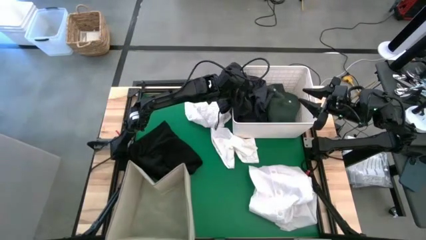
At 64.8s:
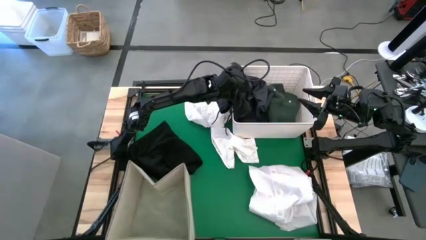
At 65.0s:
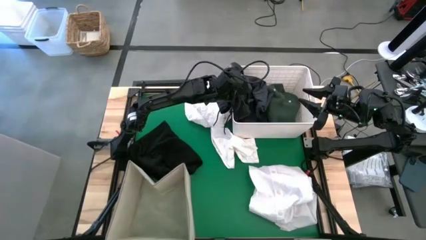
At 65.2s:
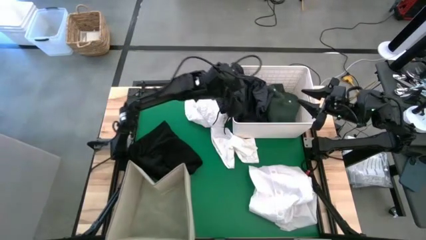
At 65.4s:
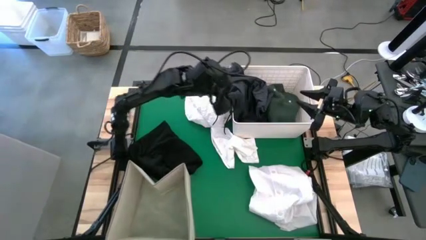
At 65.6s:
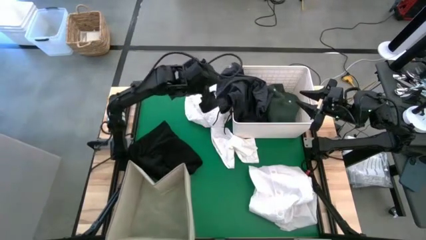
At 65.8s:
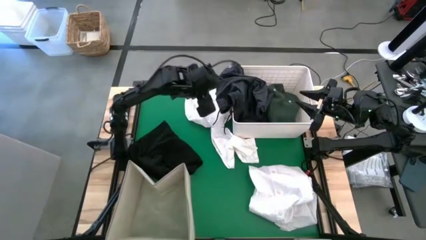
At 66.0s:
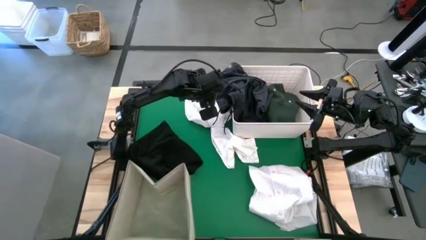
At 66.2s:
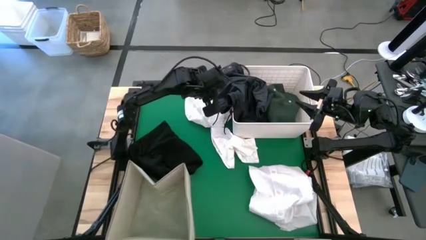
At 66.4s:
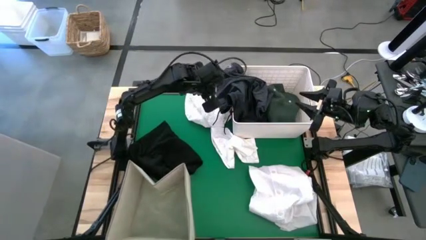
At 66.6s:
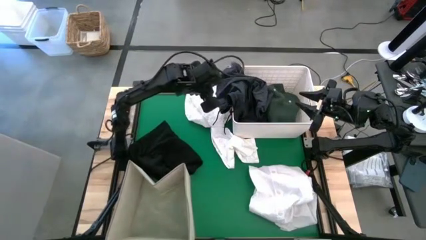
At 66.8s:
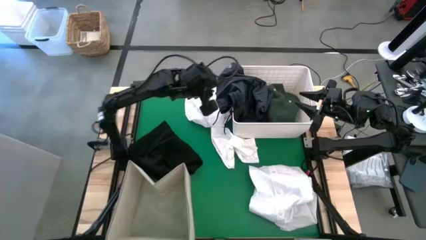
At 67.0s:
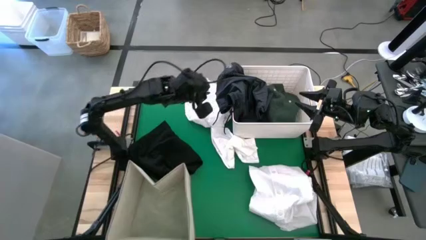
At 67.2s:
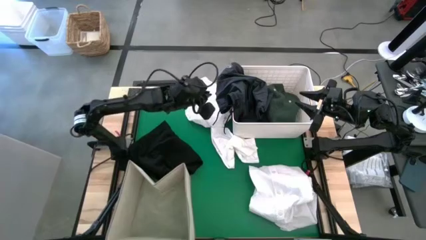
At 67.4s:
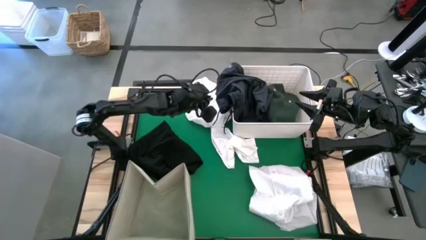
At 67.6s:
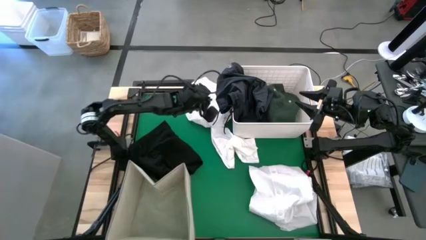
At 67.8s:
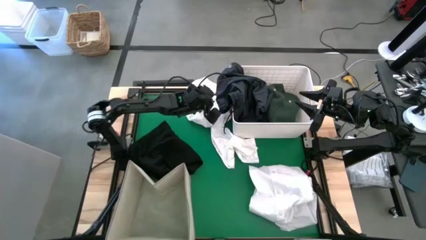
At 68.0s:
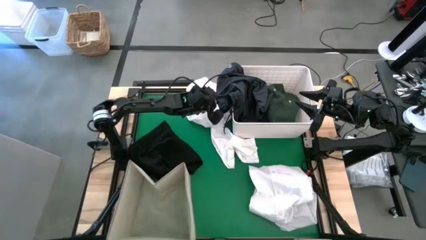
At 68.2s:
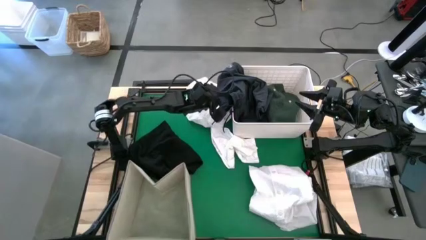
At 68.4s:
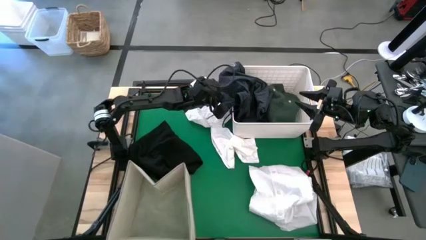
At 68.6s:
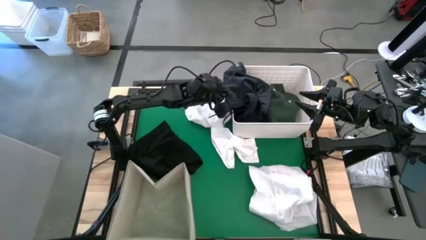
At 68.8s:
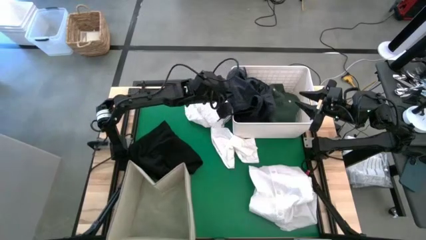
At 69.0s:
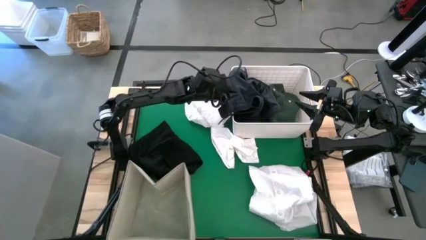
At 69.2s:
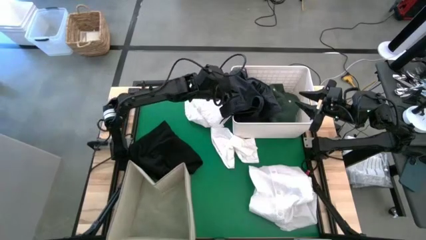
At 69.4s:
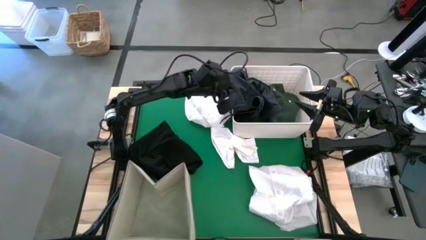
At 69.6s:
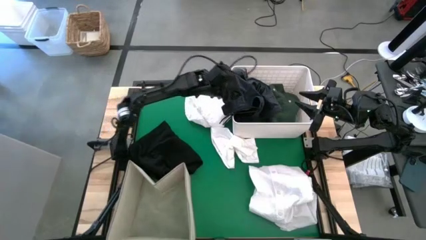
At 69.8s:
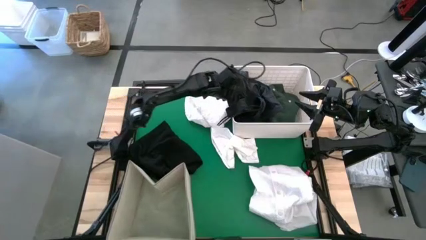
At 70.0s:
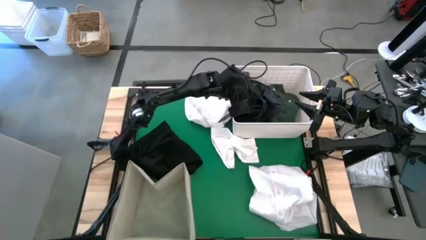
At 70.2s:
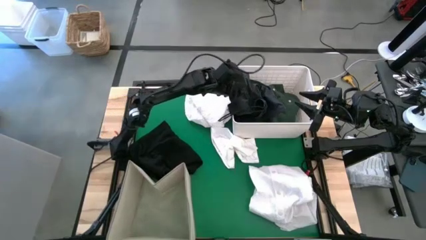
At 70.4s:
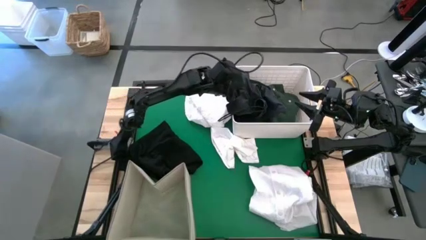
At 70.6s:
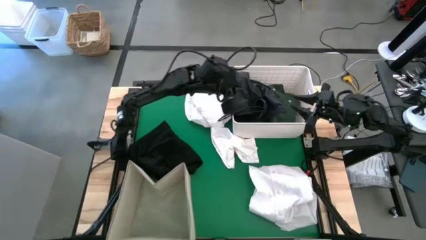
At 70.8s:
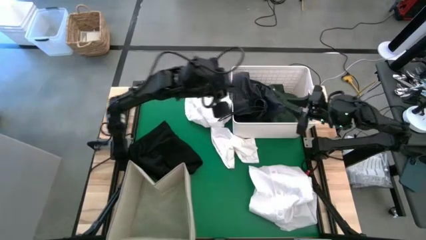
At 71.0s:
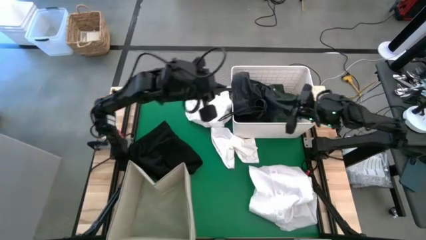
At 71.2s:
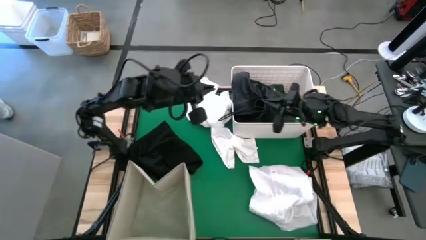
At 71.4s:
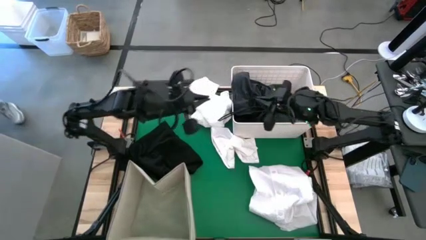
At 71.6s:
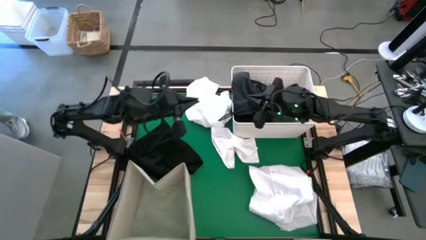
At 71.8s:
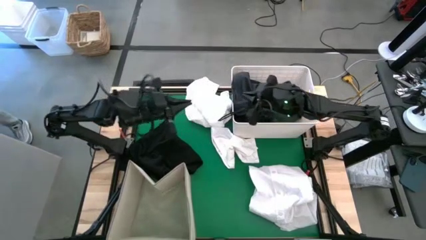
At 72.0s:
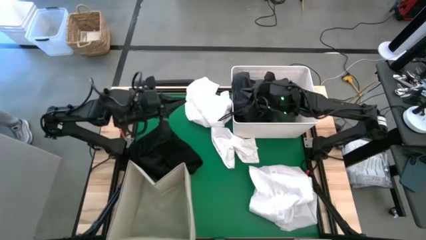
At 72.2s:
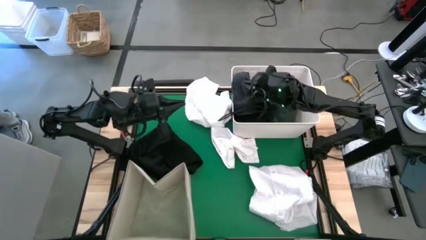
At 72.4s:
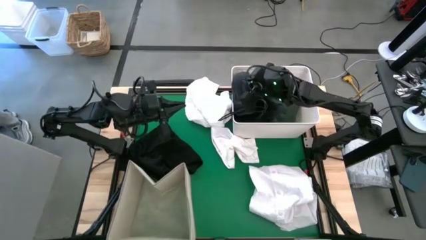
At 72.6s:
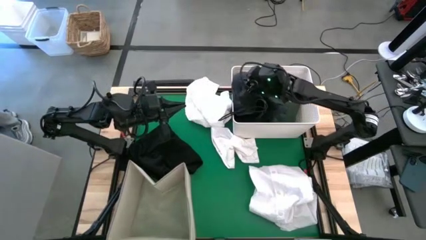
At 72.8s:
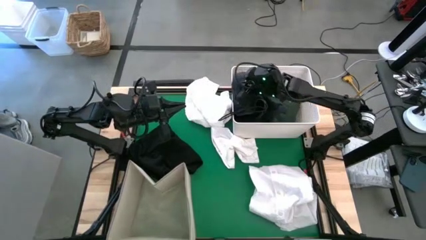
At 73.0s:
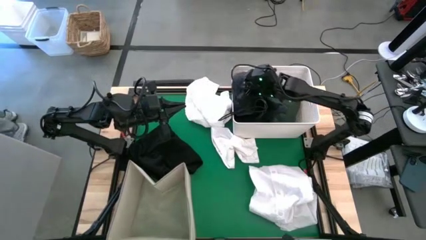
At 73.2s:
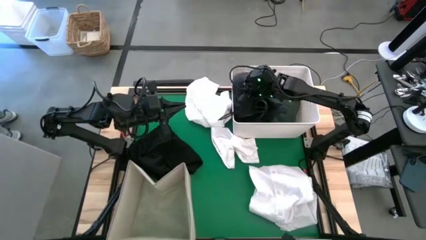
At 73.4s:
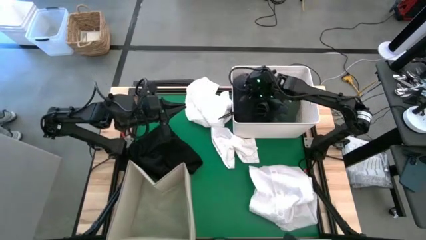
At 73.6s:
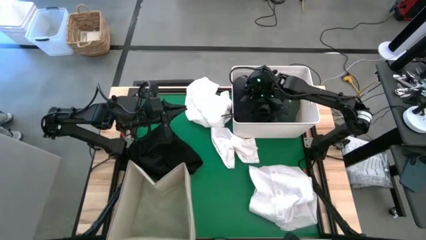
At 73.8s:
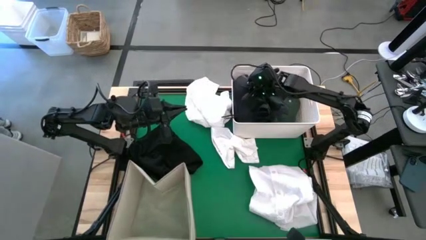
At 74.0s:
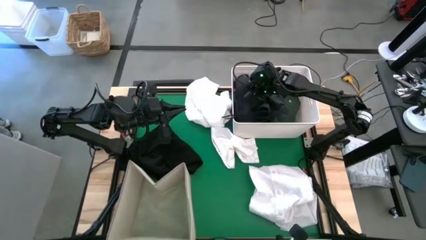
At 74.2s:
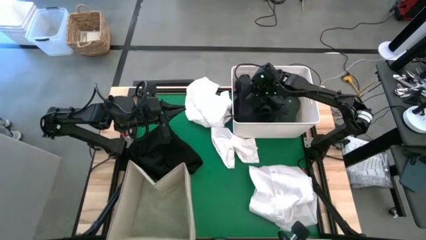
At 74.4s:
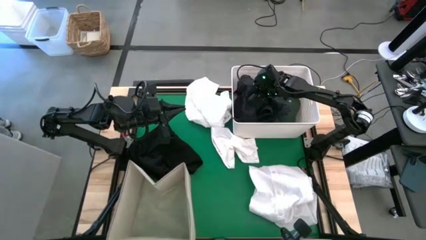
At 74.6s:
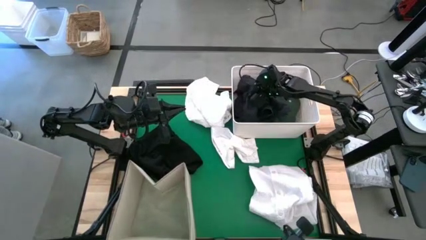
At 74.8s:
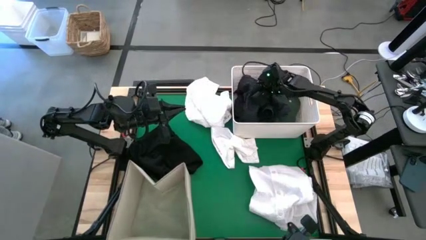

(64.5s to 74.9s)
Task: Sort clothes
Put the black shorts into the top right white bin
